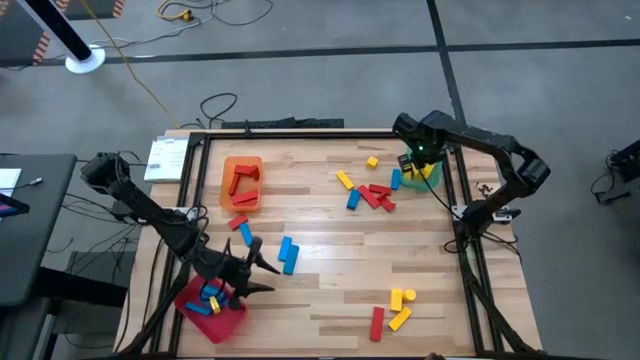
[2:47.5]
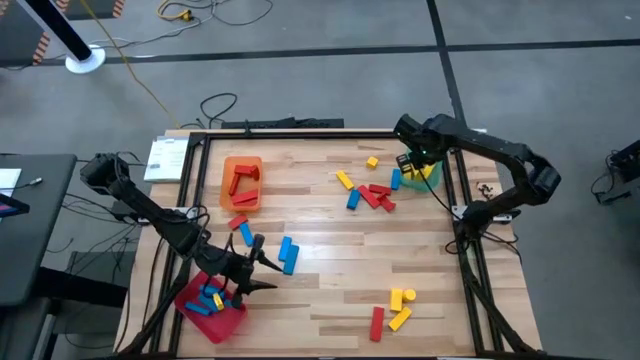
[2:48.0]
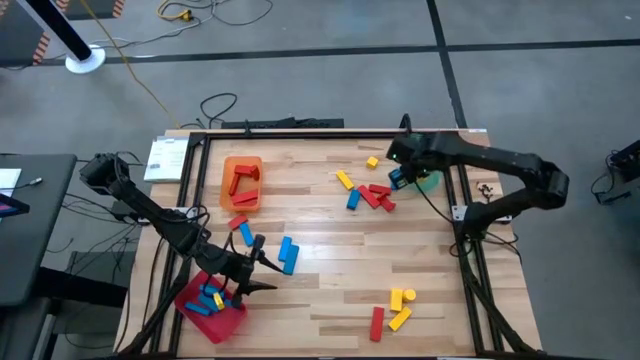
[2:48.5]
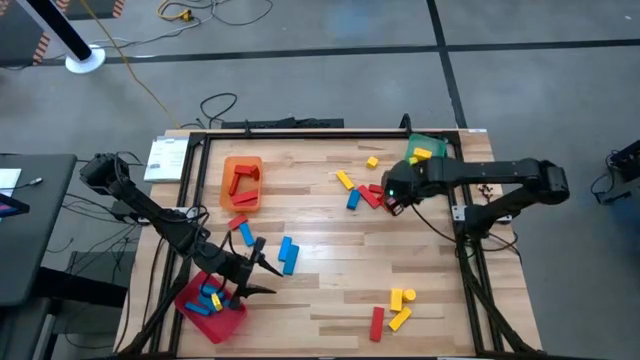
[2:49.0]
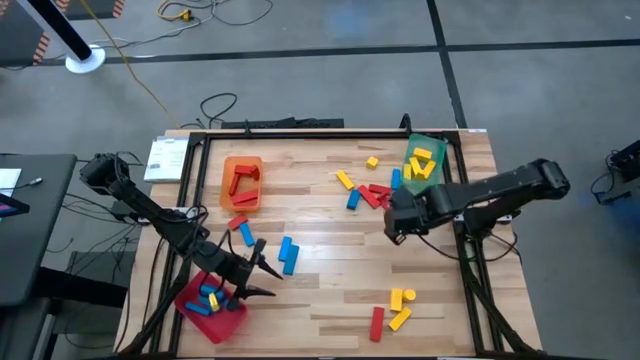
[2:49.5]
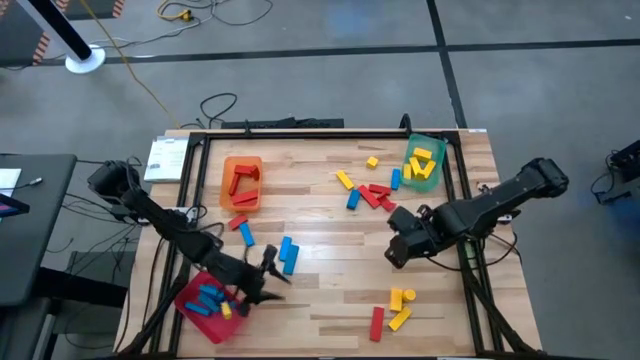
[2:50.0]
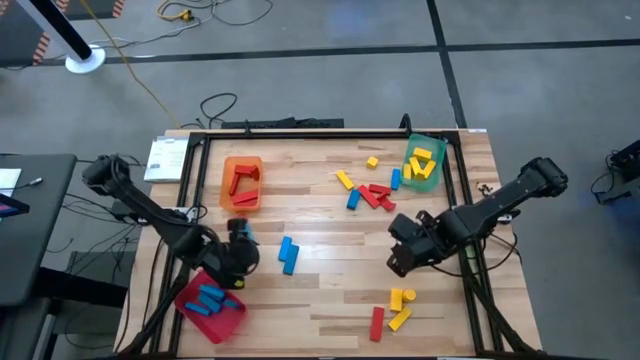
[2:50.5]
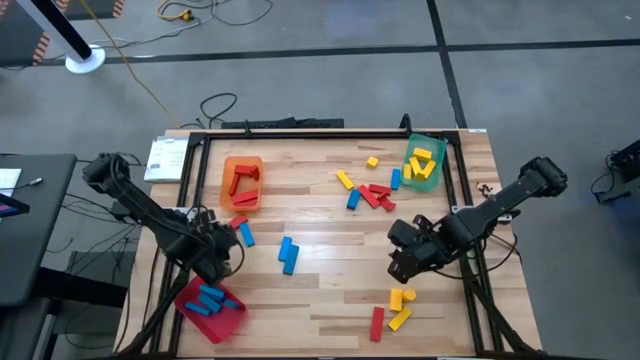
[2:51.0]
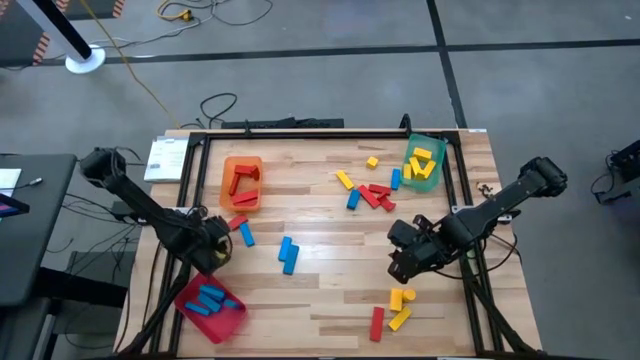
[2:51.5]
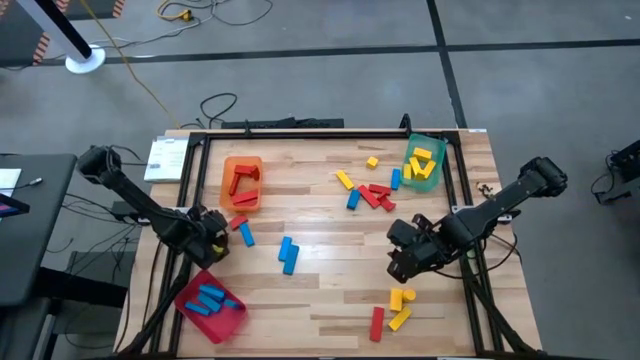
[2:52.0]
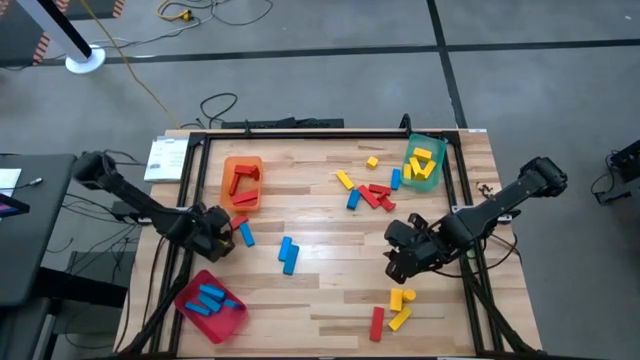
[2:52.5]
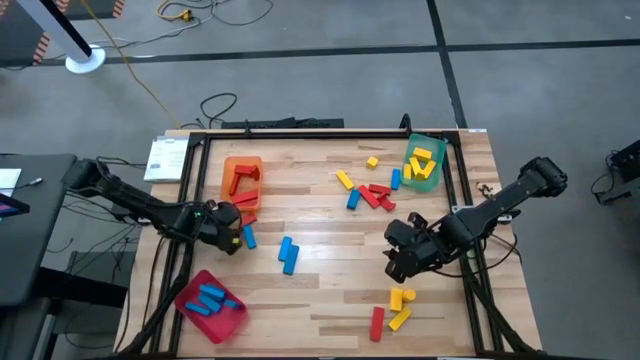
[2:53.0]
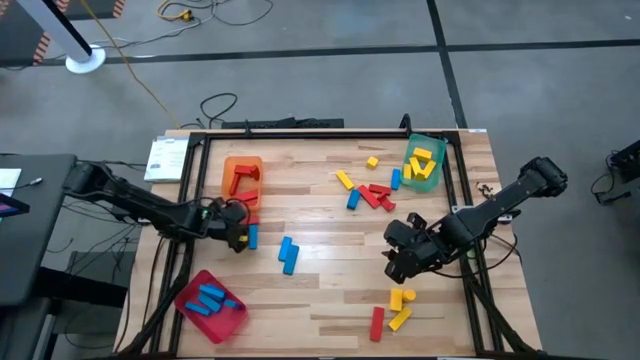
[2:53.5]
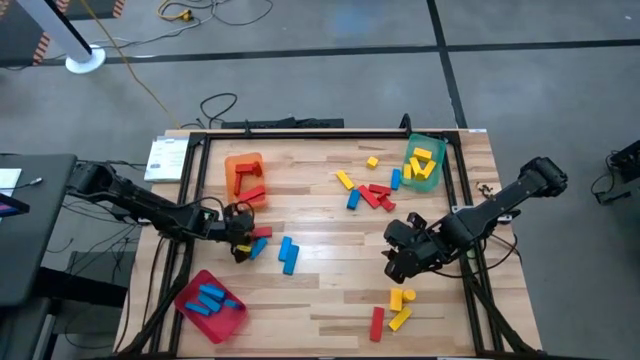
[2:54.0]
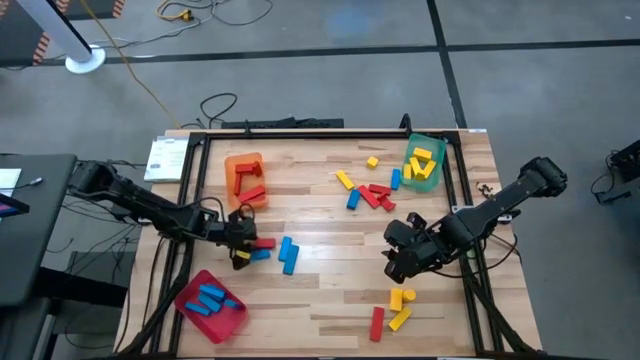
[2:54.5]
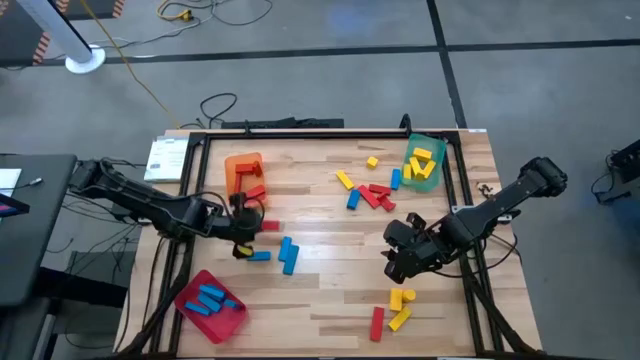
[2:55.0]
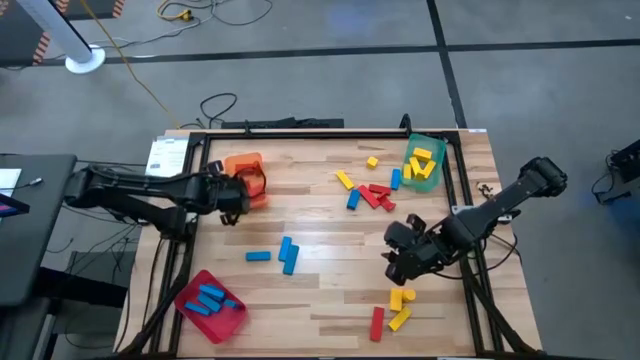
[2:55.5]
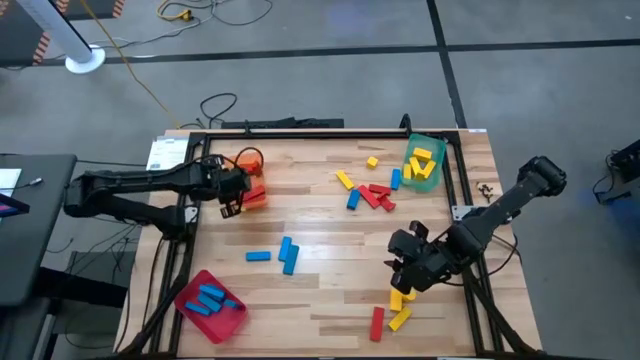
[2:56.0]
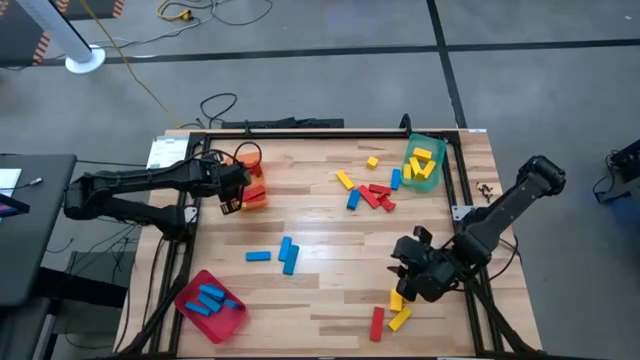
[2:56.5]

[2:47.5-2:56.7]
Task: Sort blocks
Put the red wooden block into the orange bin

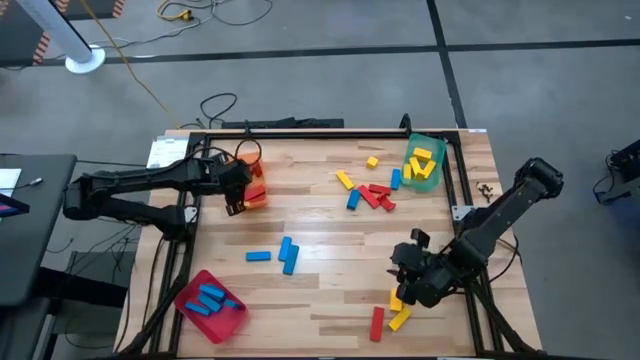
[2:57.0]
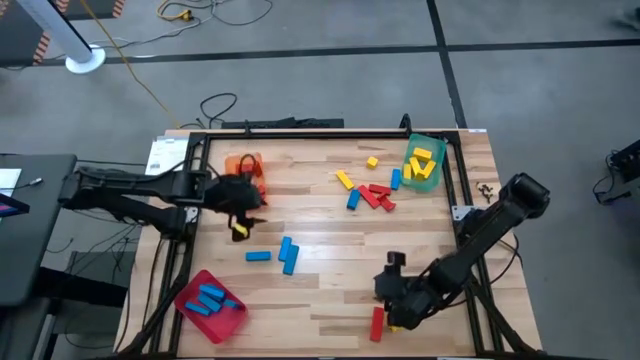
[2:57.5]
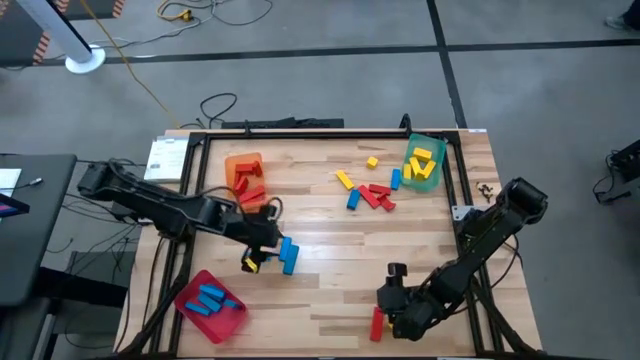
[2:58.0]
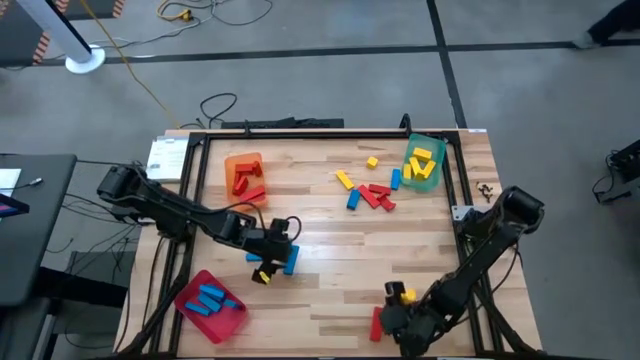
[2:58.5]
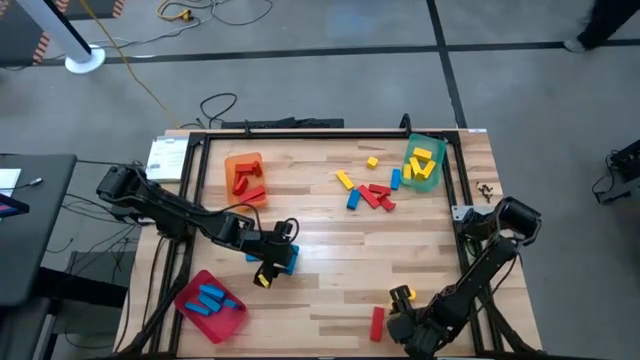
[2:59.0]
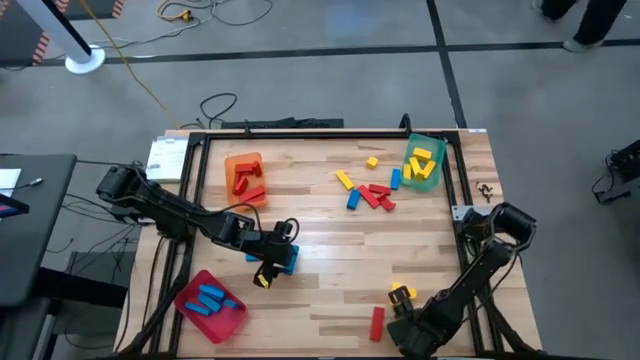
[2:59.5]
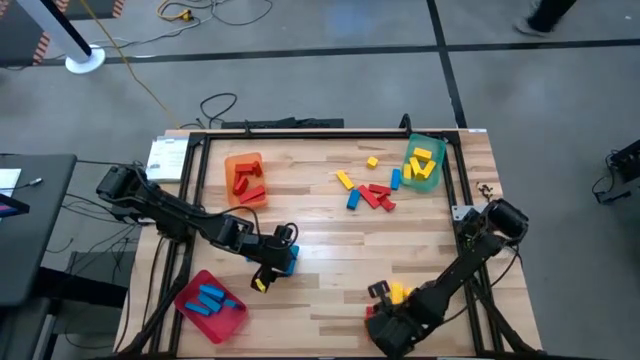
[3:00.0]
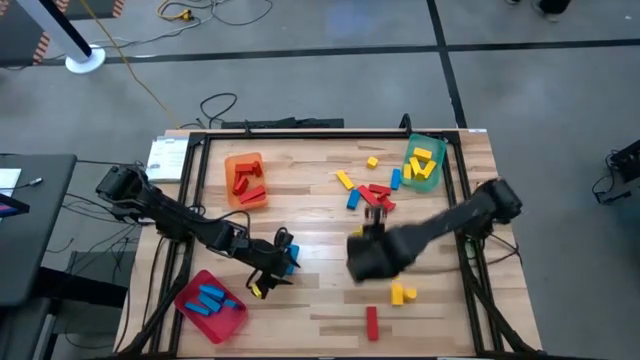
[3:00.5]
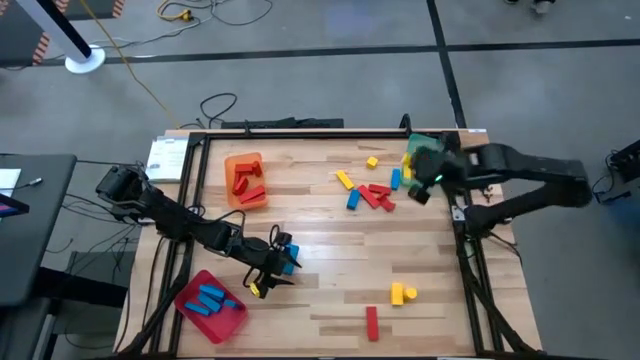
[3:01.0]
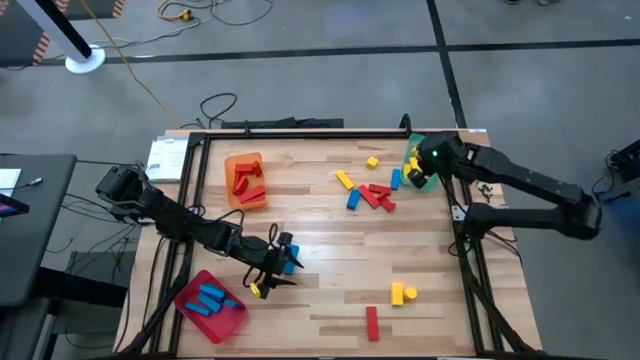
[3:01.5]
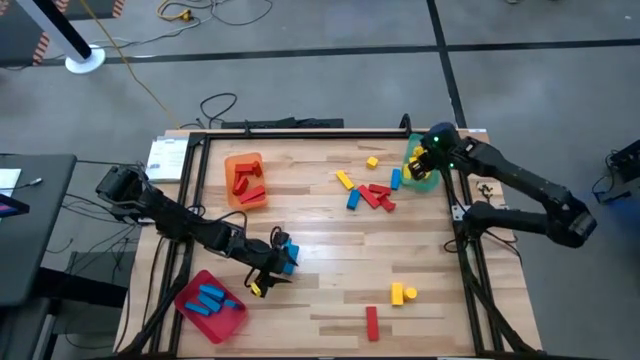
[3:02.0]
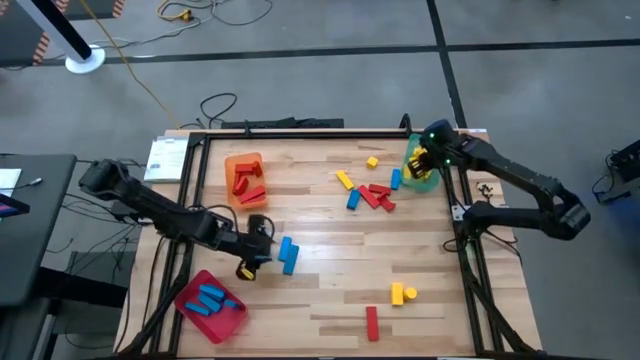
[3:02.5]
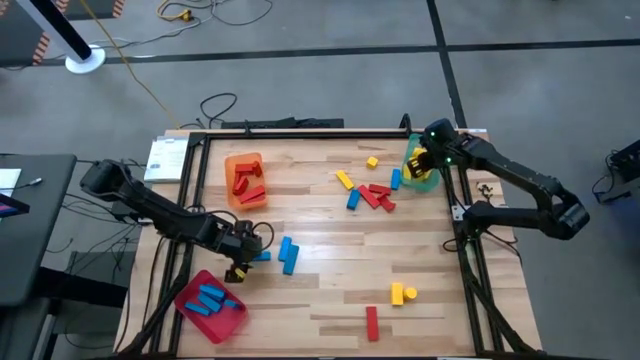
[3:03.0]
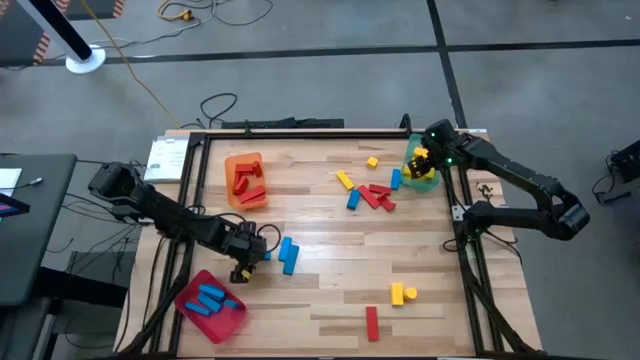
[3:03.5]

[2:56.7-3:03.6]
Put the yellow wooden block into the green bin

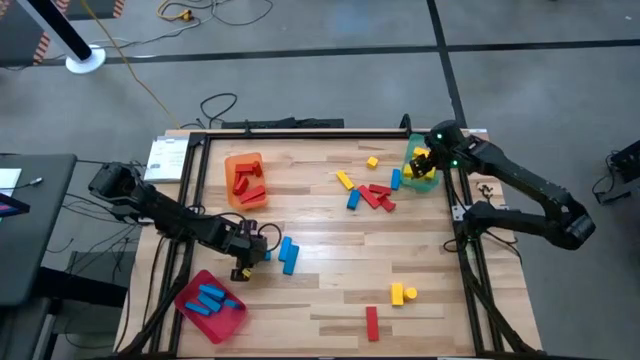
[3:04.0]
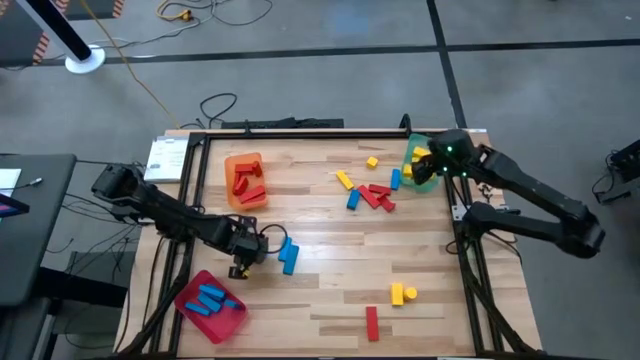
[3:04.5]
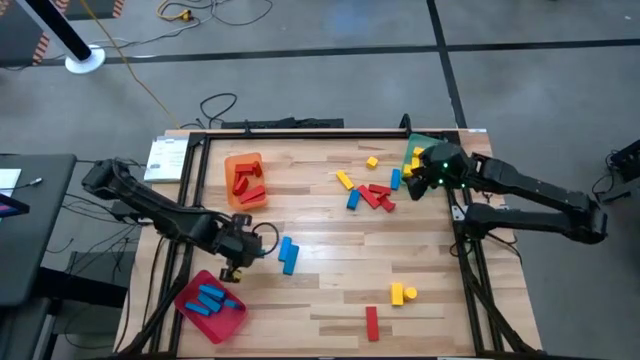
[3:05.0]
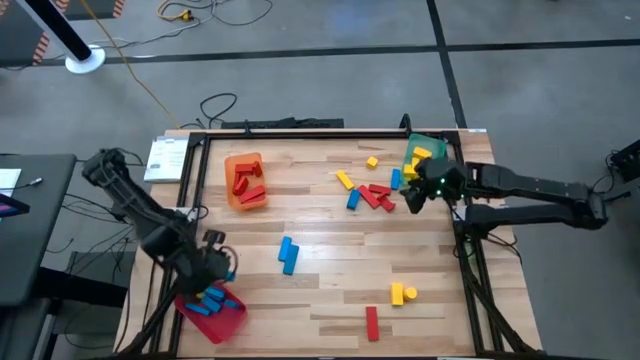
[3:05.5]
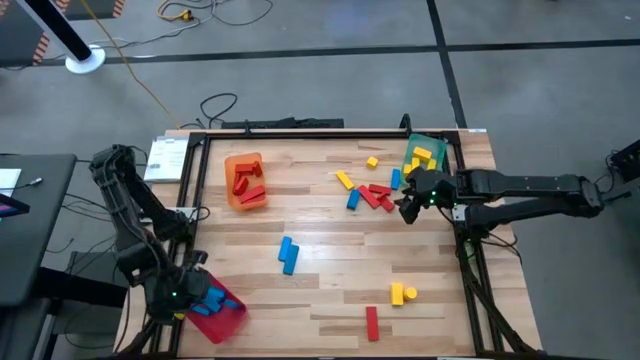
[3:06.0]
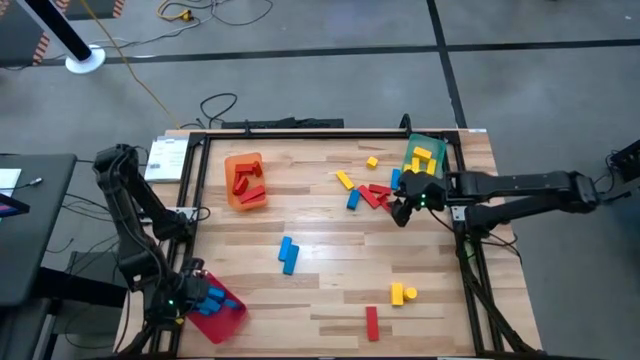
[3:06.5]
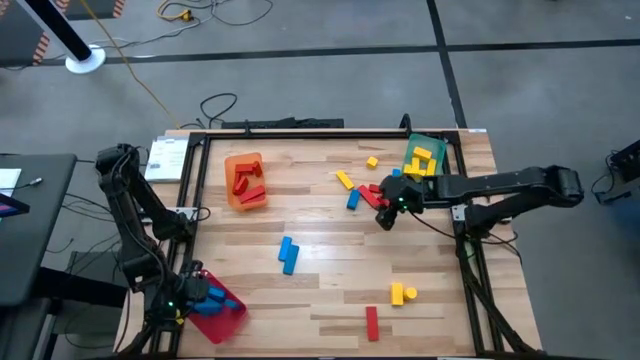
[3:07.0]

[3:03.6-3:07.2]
Put the blue wooden block into the red bin
